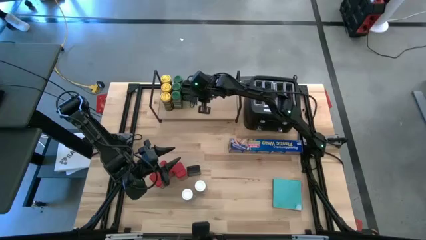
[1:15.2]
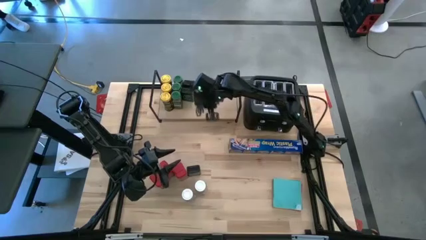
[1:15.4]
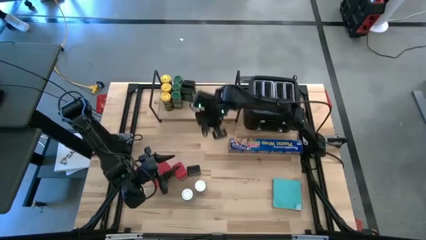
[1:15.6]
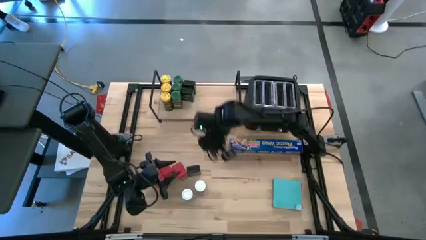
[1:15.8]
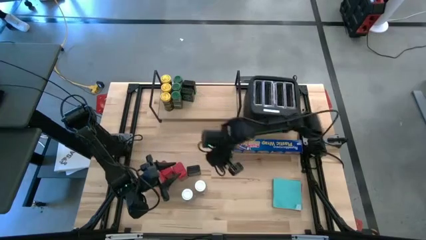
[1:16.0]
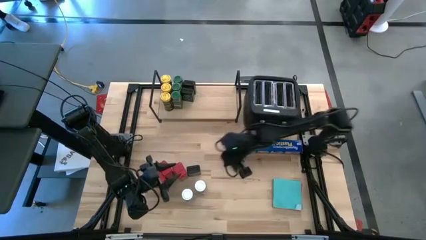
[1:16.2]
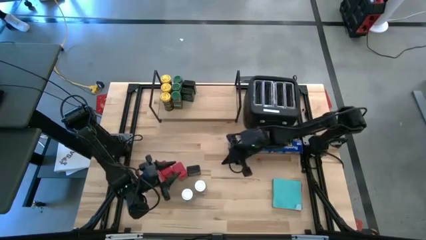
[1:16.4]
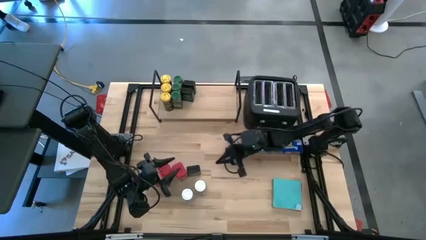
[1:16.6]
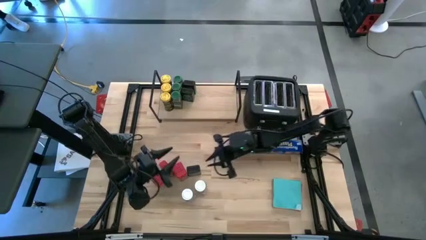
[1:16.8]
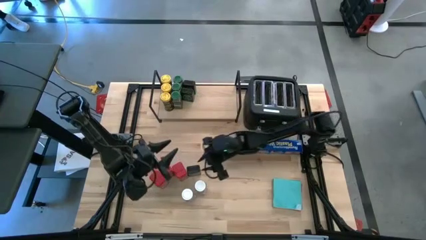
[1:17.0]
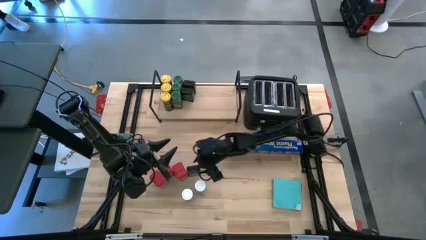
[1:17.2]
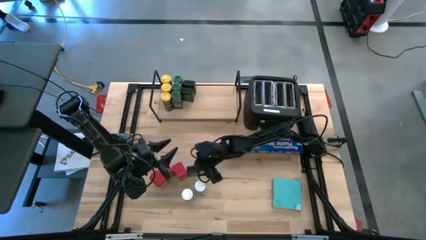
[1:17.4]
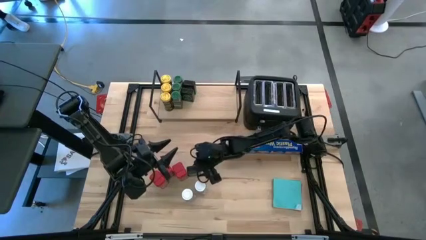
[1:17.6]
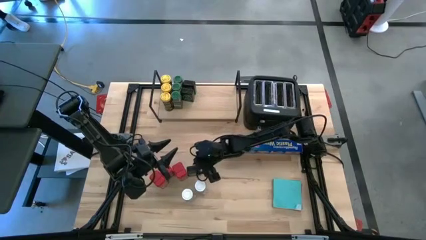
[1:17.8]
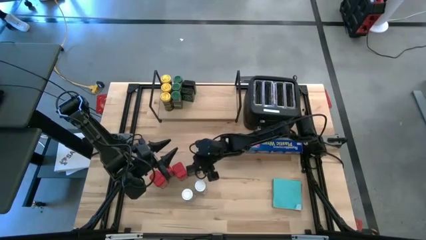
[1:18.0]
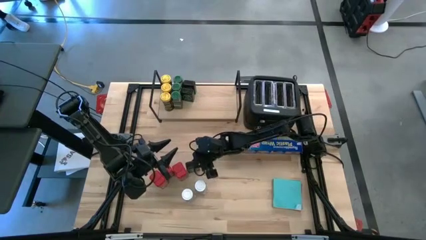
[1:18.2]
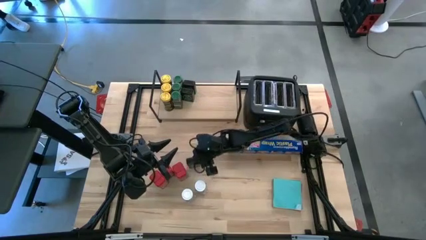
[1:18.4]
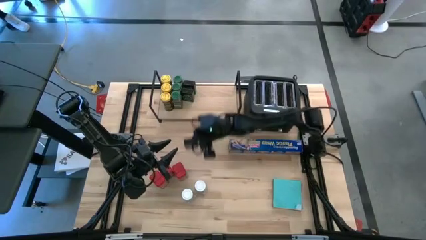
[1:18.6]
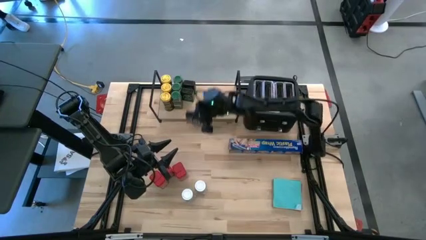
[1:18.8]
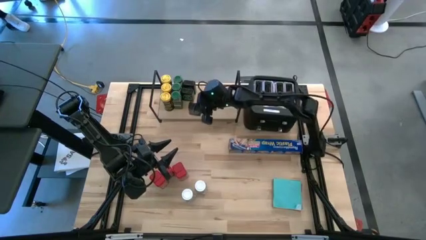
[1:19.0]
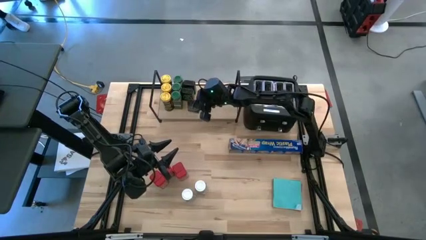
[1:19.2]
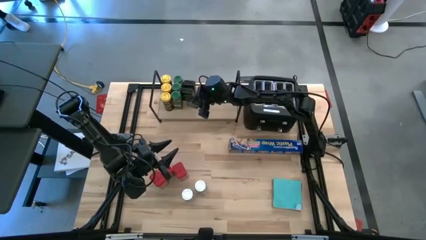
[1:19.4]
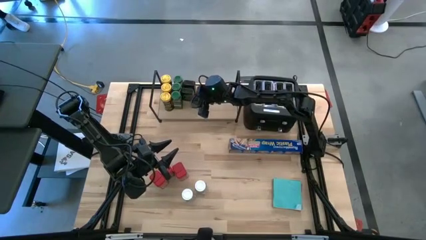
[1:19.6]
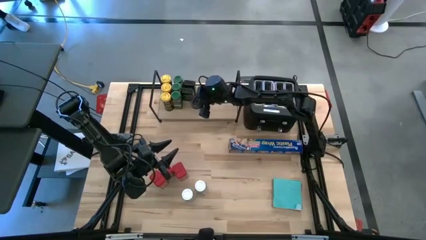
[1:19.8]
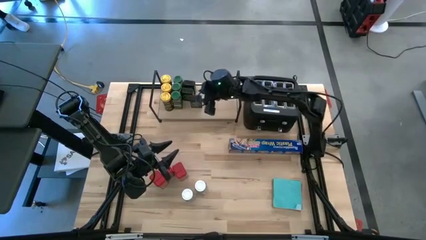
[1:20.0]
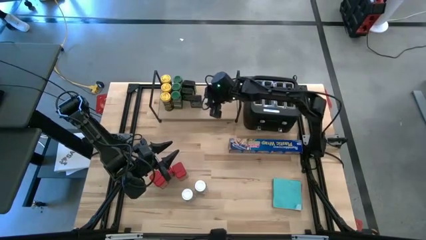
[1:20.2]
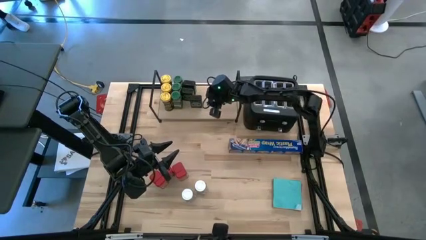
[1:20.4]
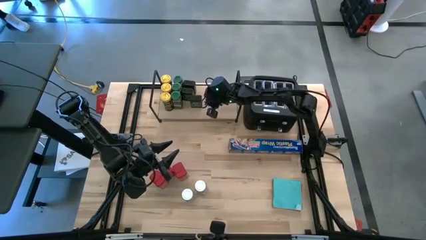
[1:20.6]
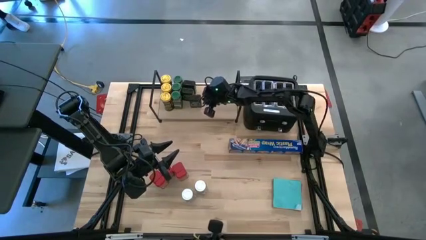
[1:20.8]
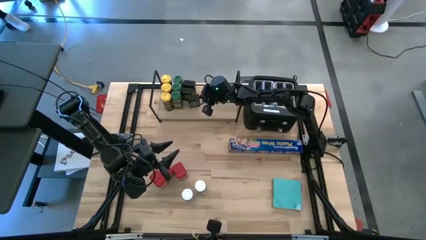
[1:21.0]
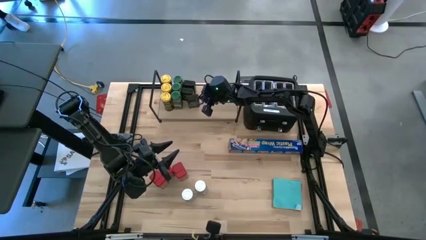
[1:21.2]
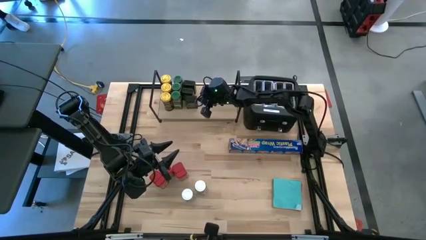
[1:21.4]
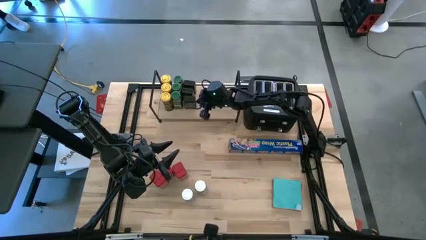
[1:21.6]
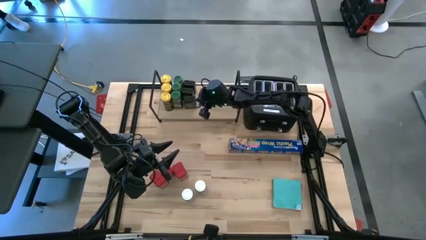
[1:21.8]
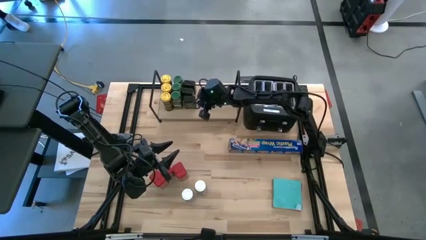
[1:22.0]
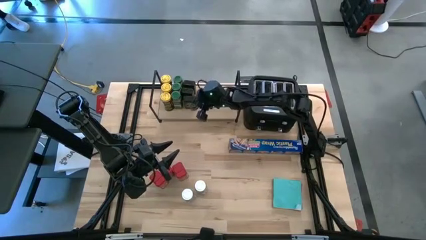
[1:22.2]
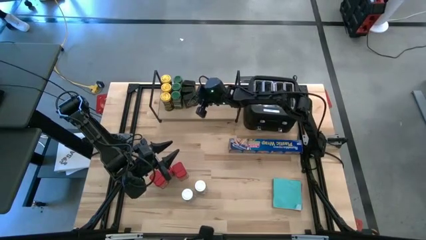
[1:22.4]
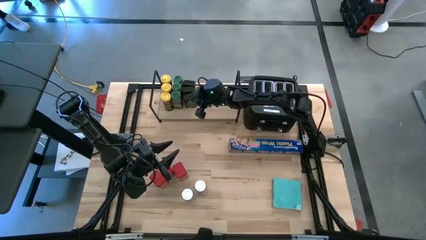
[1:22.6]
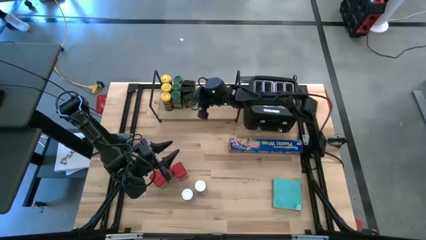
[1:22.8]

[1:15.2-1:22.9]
Task: Shelf spices
Put the green seasoning can on the shelf aligned with the other green seasoning cans

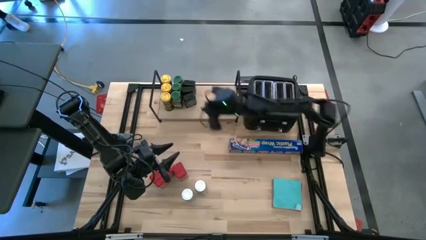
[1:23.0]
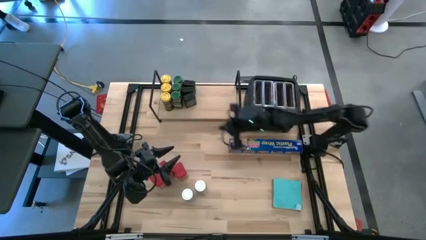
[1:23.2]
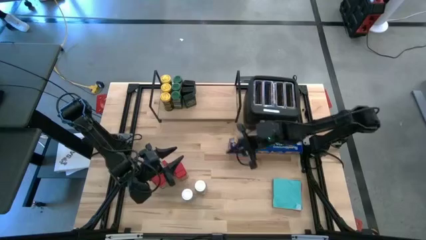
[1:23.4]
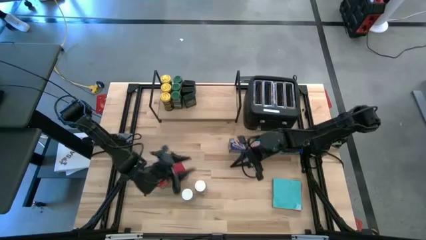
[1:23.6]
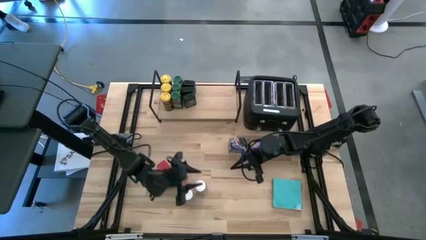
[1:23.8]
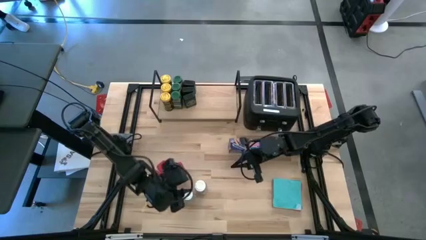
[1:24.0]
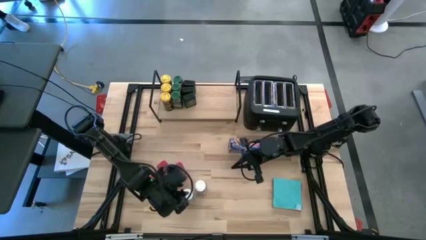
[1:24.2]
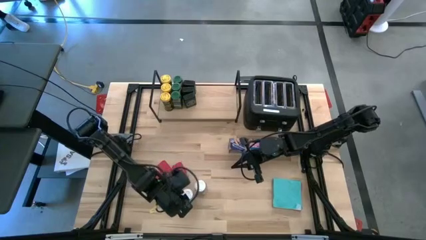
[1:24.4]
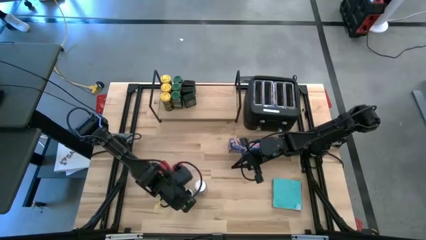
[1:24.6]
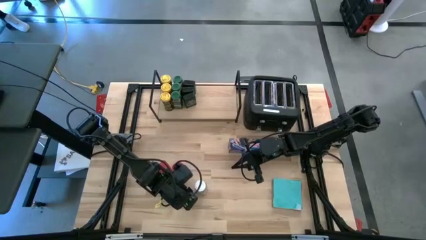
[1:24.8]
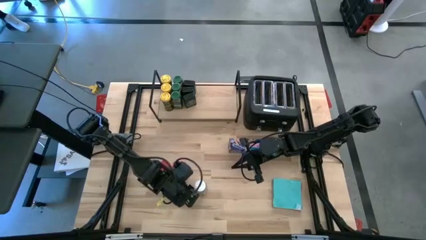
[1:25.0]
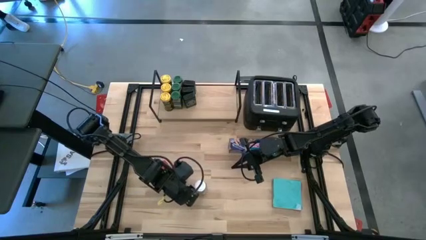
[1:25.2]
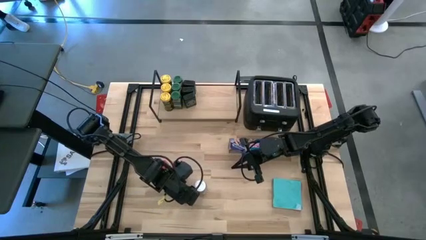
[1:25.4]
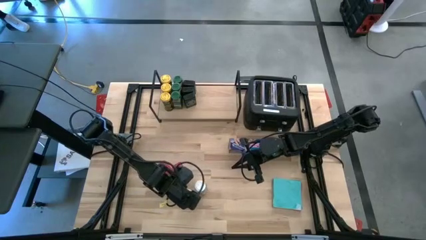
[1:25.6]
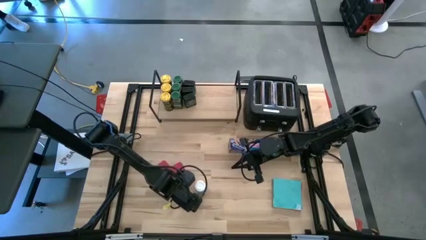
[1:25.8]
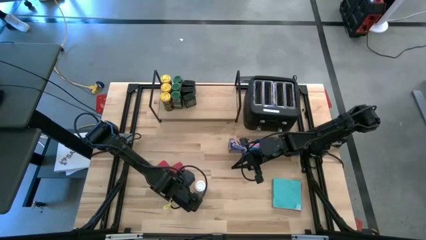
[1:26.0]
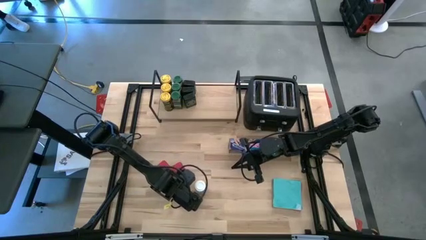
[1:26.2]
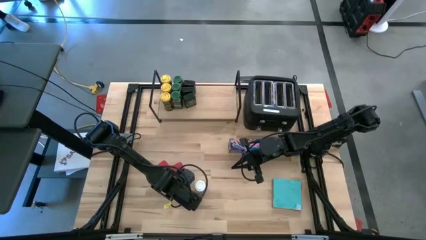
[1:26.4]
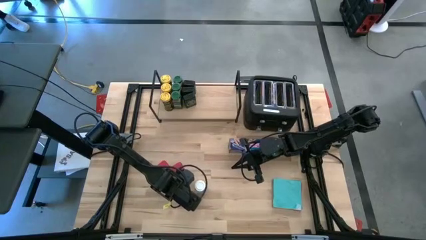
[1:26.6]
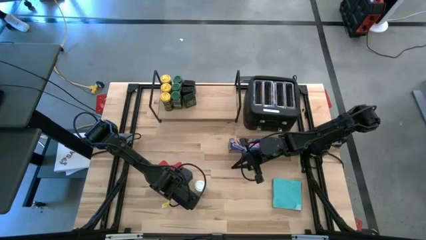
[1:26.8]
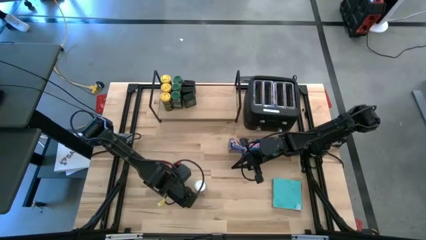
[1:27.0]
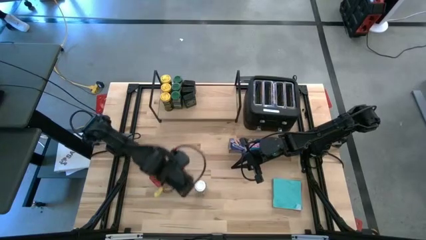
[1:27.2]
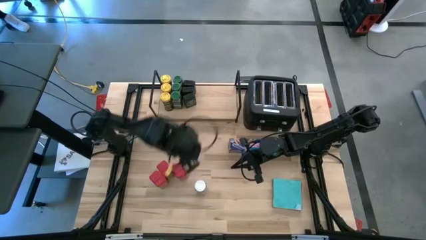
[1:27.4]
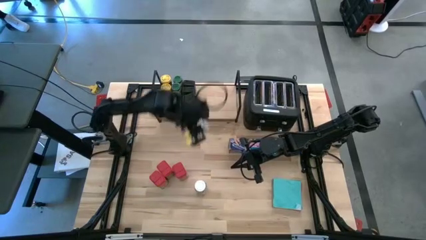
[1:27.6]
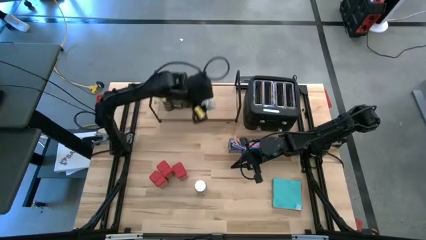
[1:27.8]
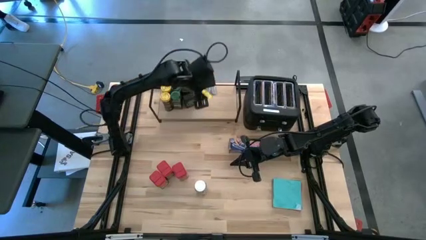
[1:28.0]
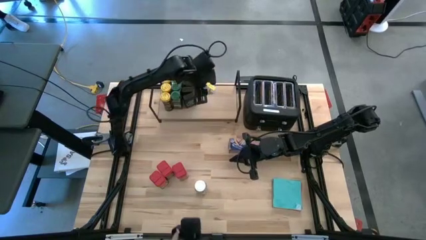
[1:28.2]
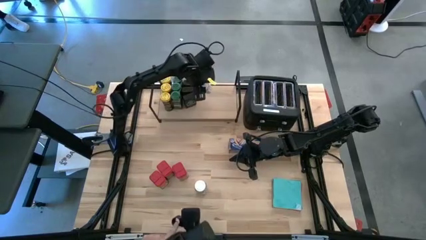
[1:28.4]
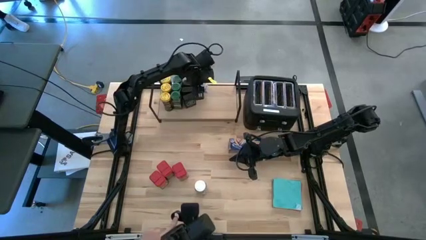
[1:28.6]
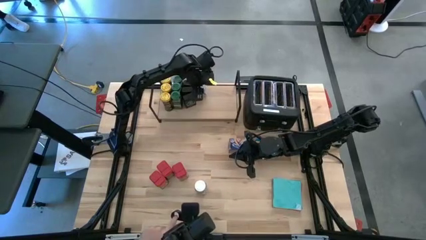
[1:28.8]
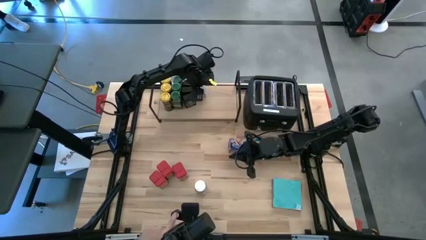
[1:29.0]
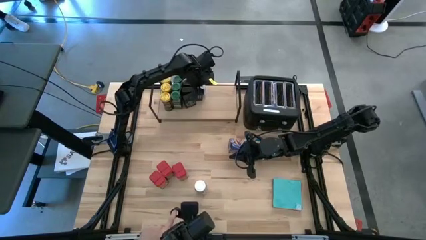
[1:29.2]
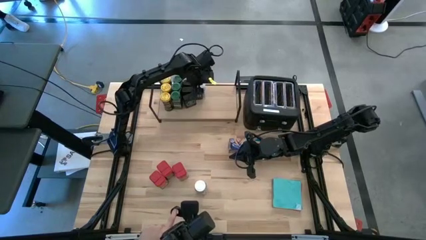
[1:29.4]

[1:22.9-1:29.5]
Put the left white seasoning bottle on the shelf

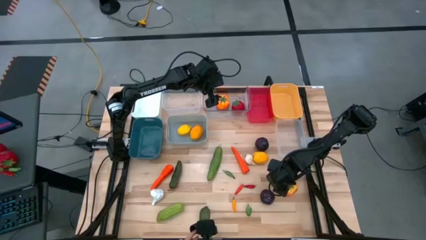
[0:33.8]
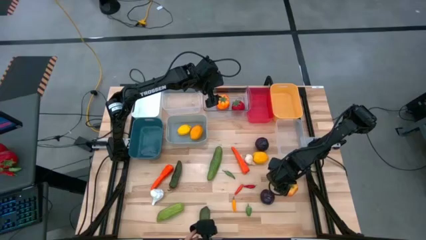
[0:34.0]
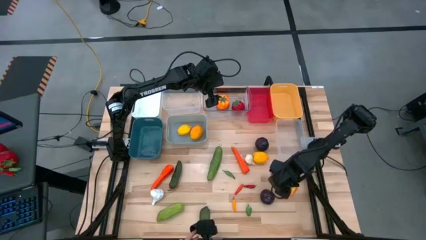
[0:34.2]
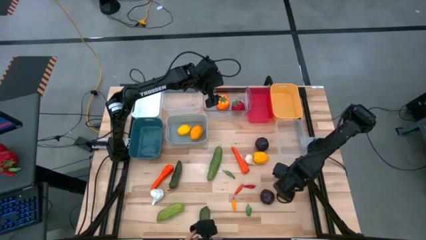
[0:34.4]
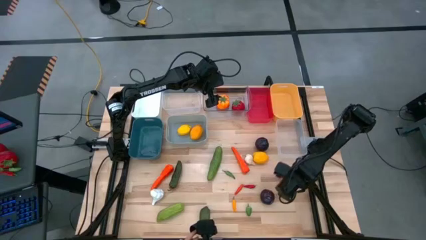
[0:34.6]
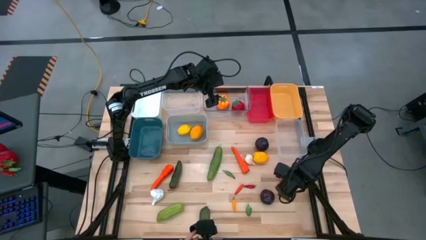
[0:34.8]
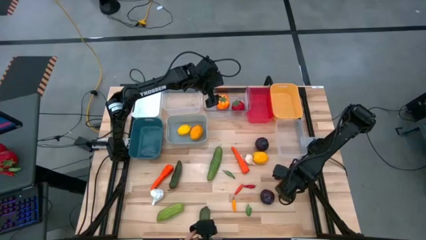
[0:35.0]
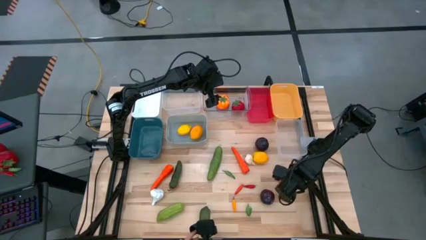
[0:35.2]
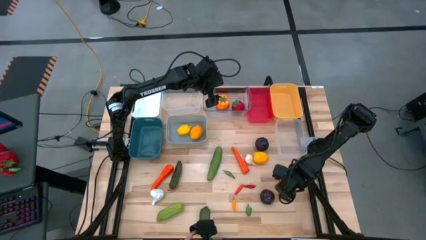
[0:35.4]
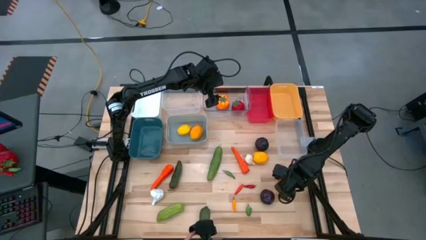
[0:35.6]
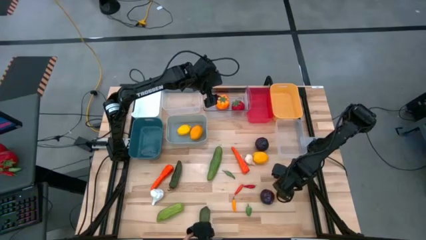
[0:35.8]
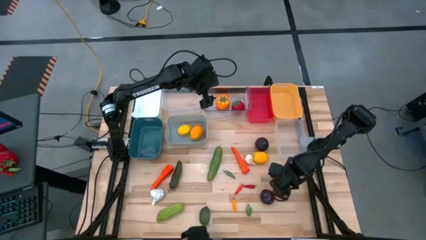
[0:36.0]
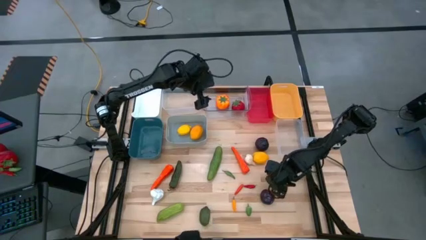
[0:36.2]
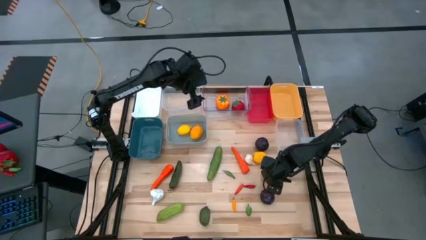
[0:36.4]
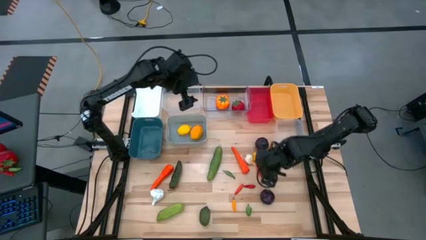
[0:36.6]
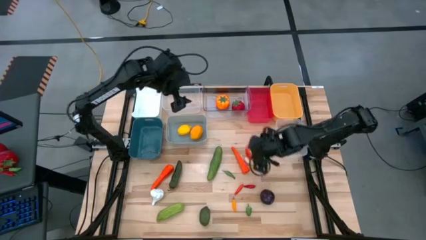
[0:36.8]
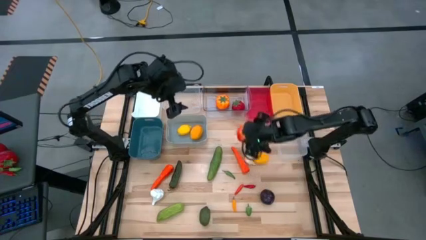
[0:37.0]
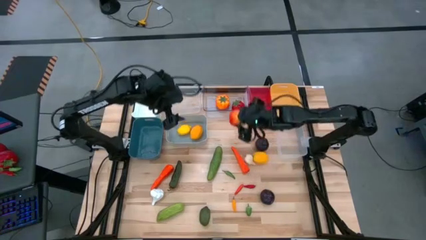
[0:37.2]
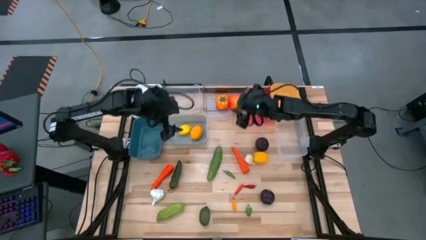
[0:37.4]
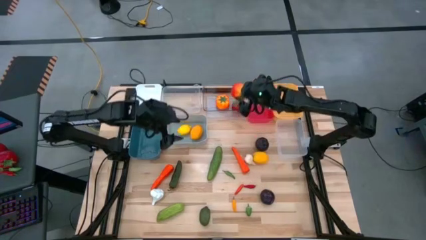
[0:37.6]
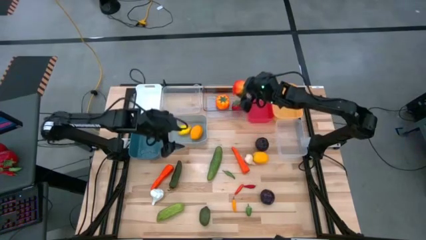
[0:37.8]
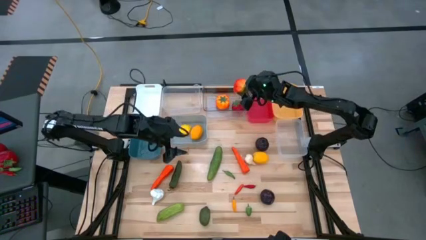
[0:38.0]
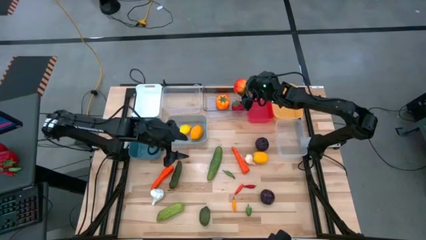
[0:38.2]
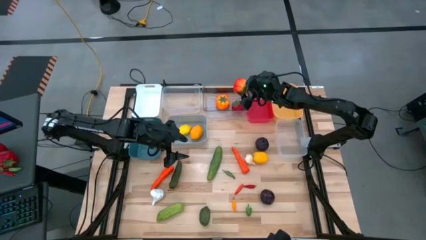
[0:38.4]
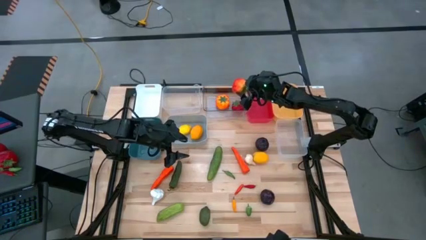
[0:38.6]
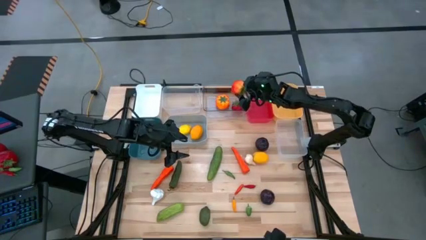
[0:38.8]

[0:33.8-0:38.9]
Task: Sort produce into baskets
Put the orange tomato into the top right transparent bin
